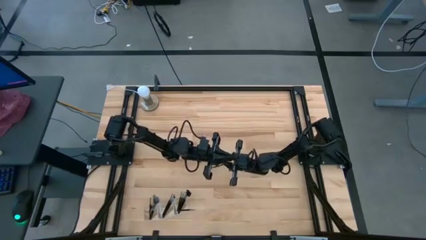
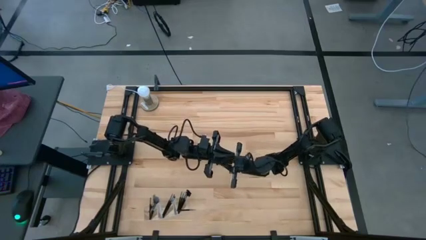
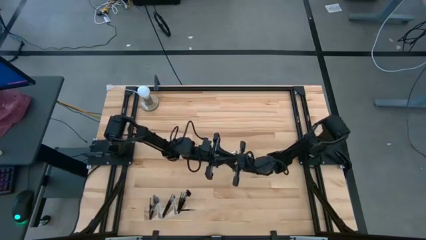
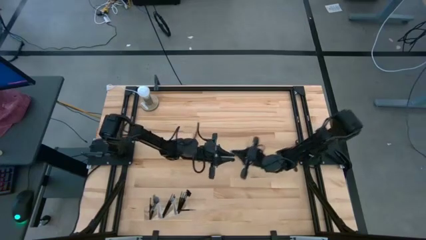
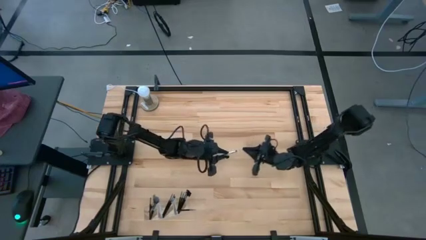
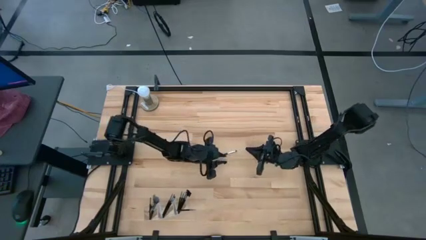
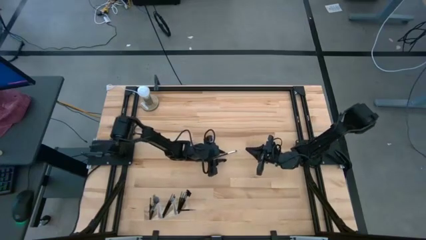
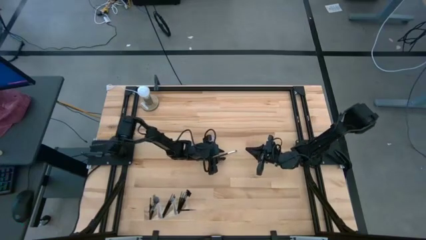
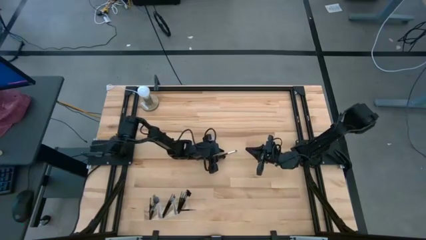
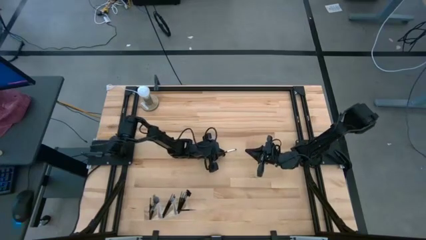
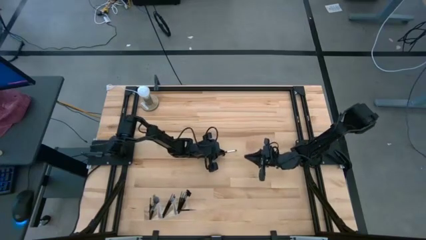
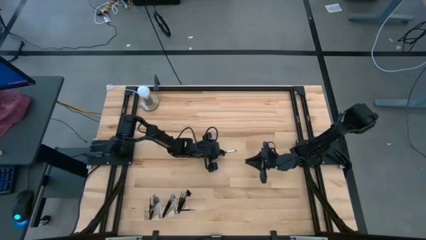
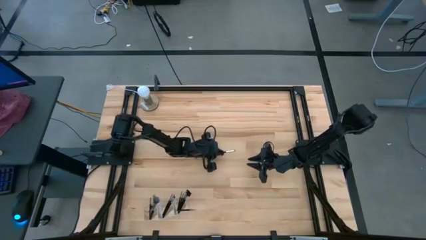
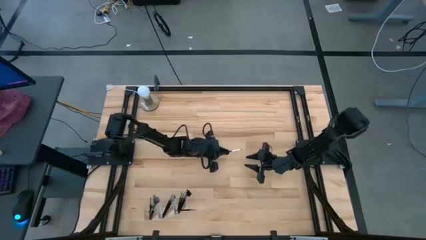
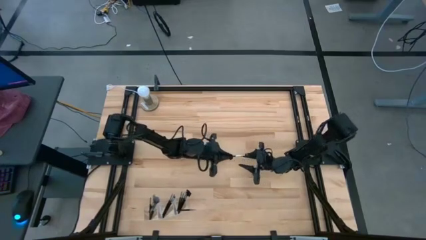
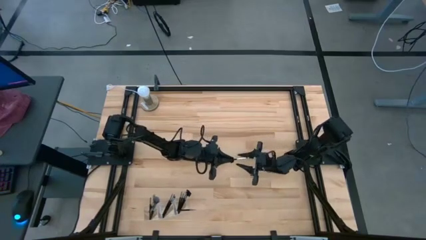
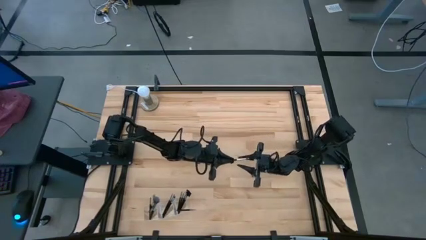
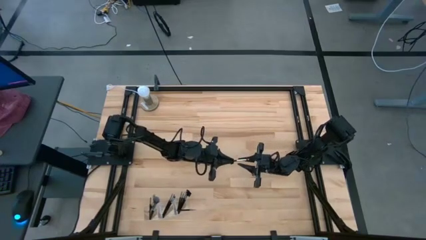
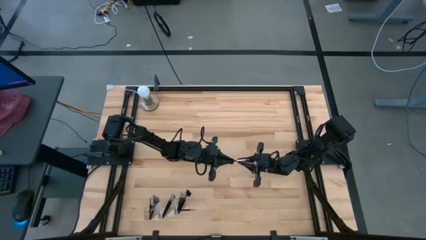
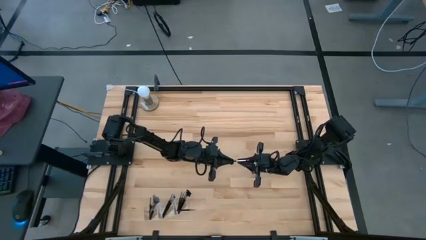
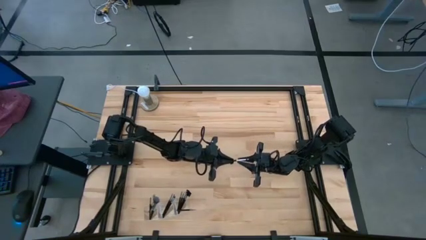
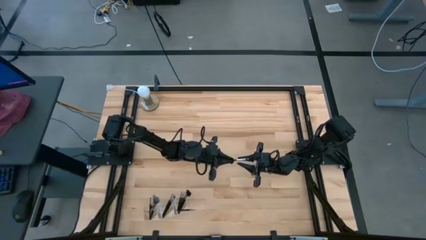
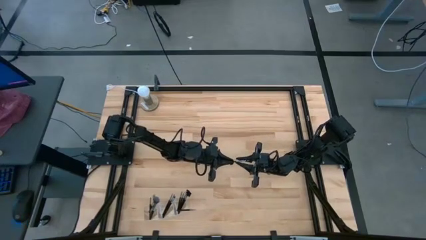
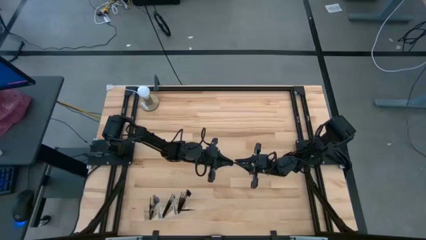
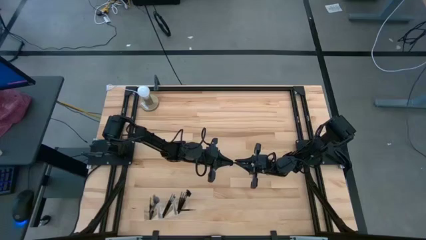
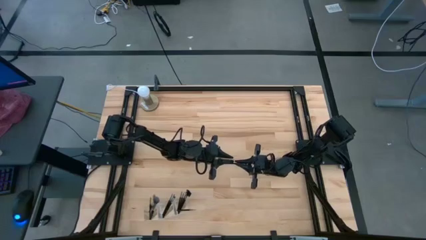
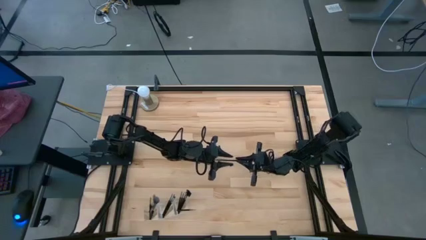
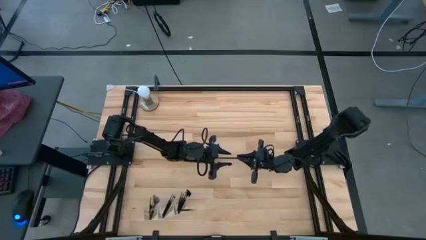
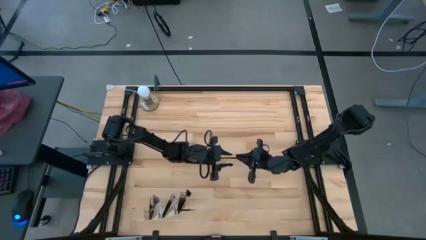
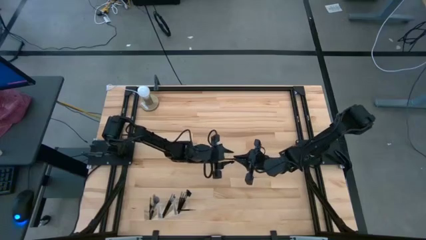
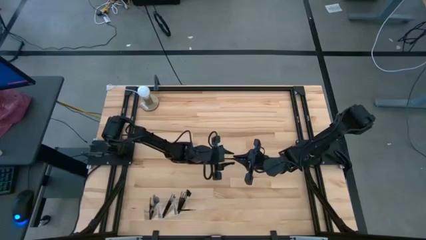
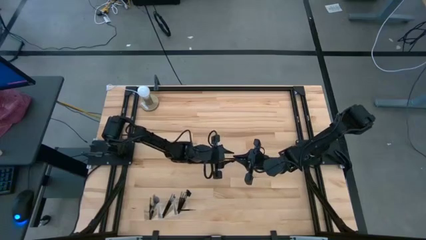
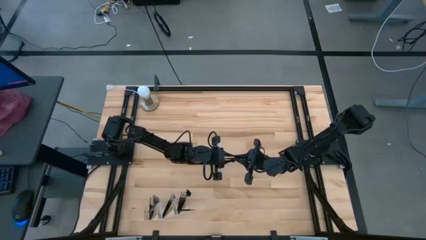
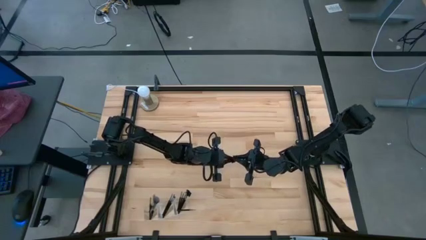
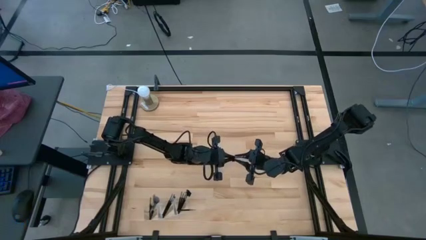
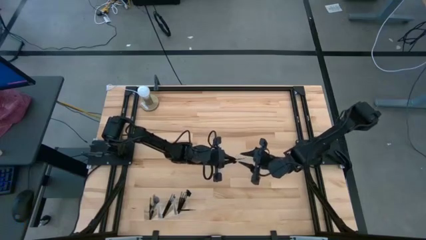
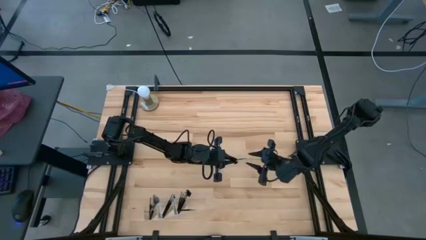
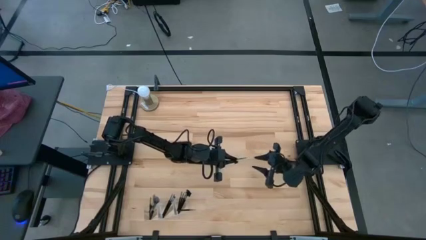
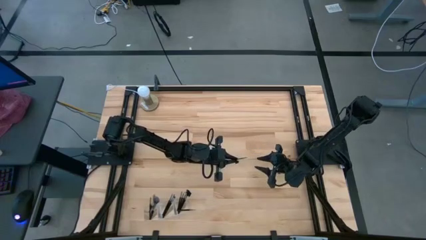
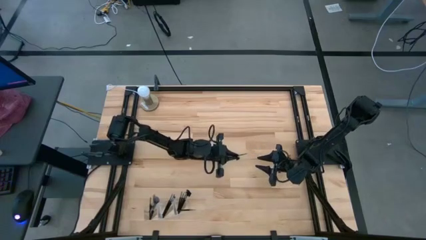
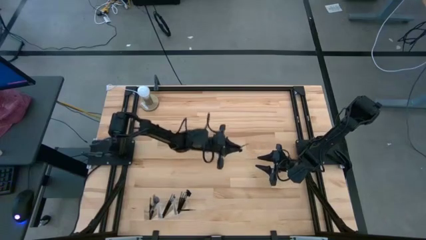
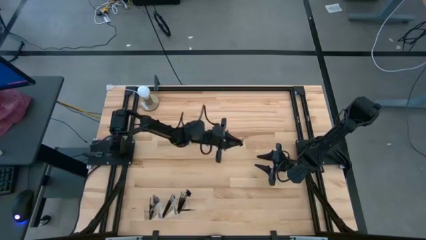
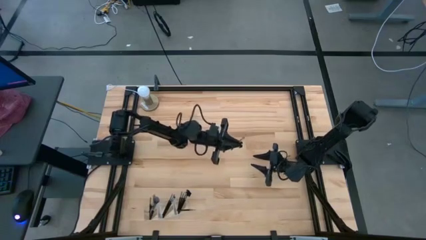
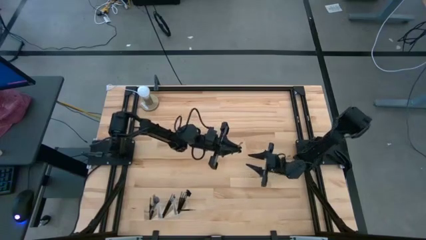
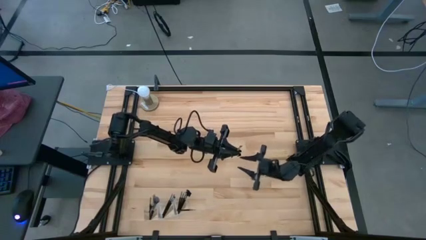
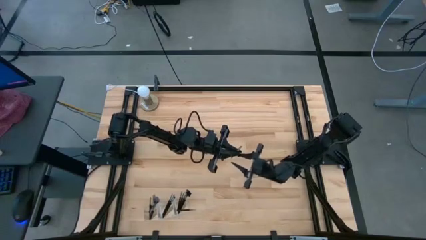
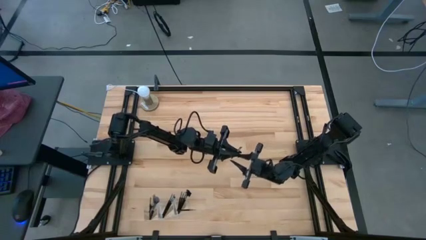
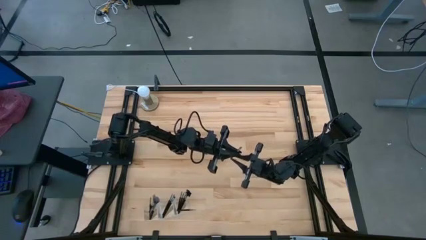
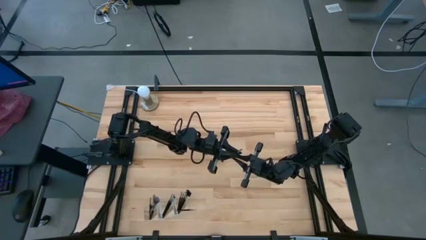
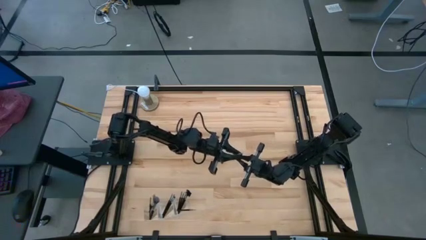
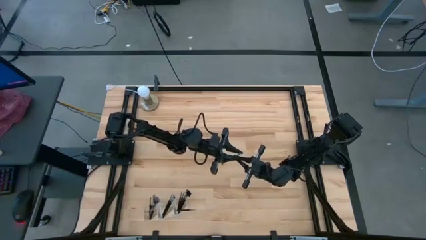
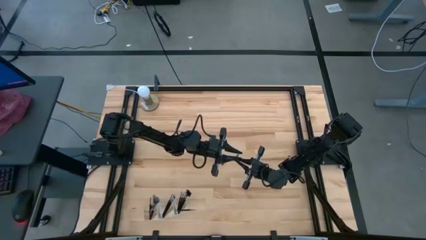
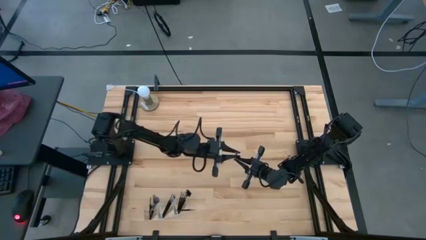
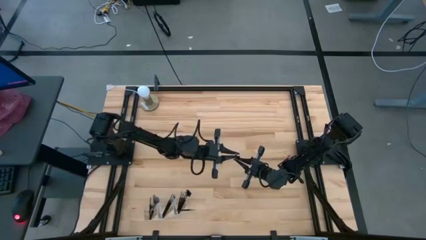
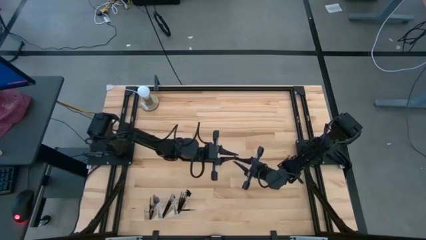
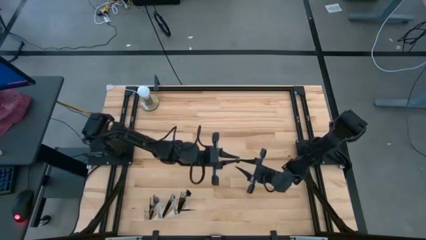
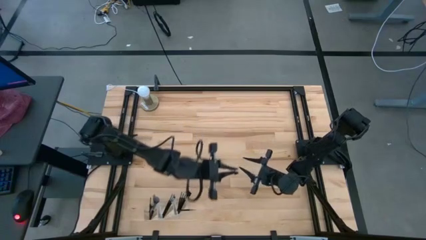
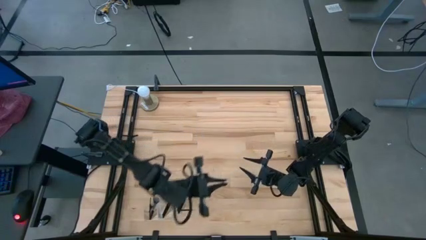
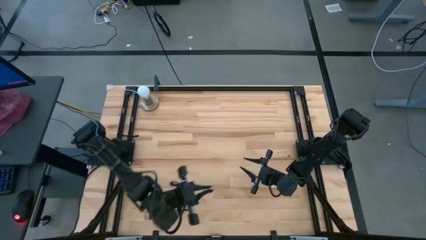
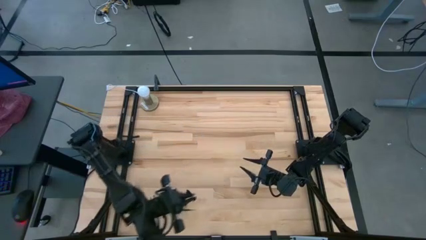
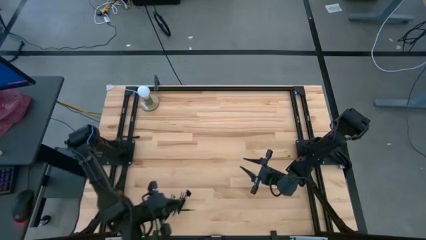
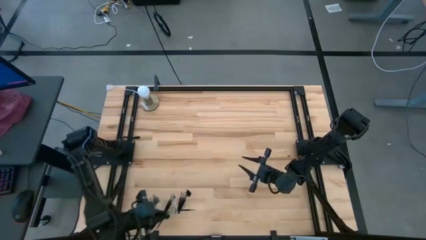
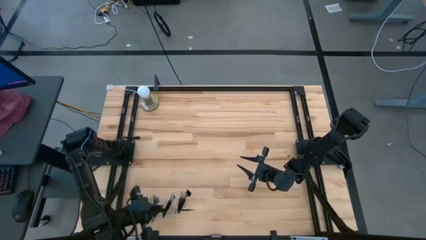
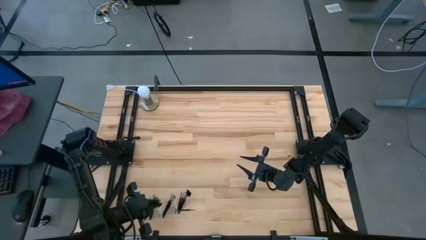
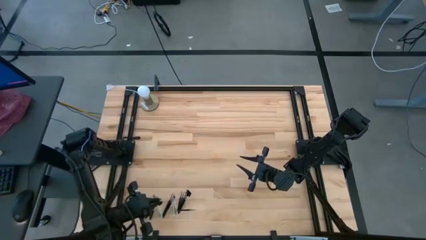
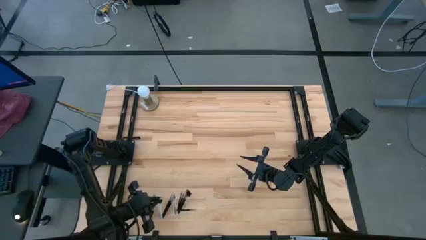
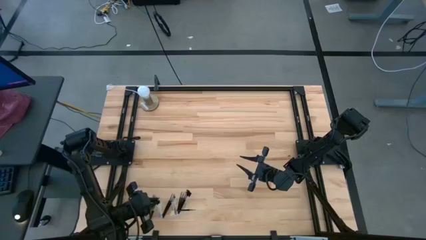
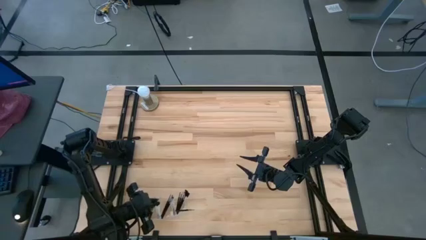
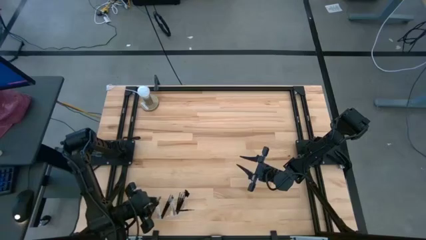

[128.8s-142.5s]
Task: Put items in baskets/containers
Put the black eyeshadow brush into the transparent organizer

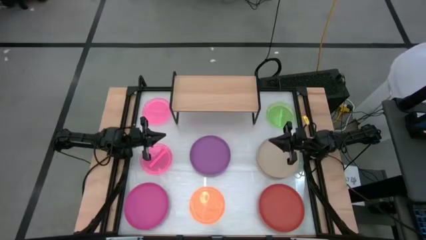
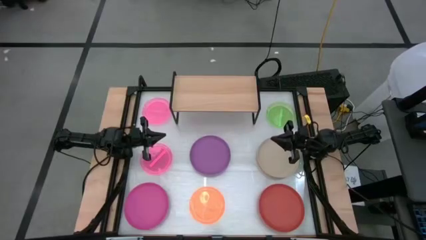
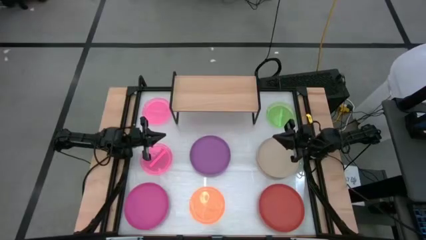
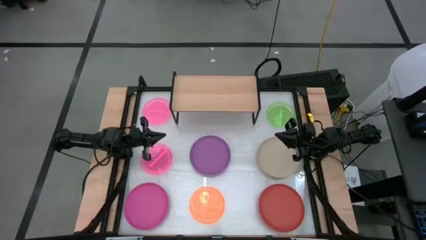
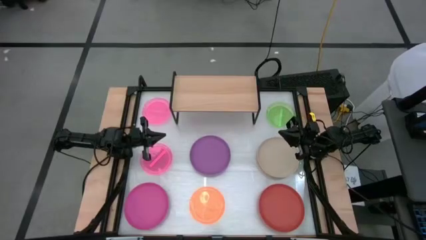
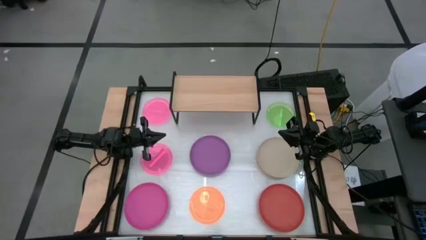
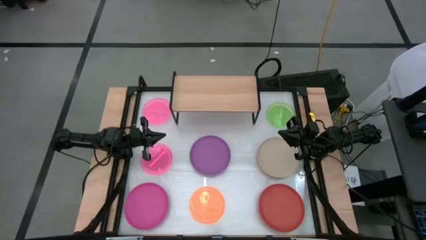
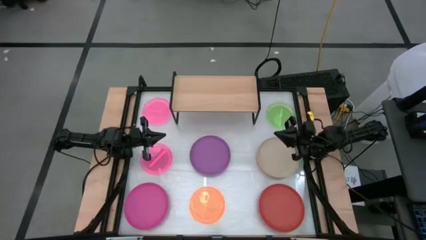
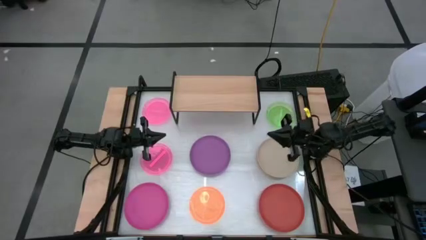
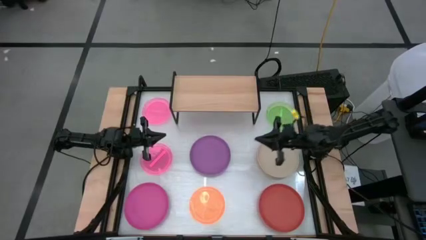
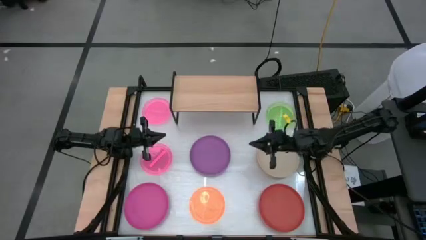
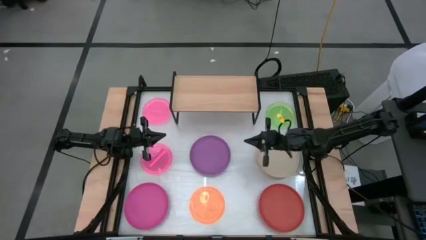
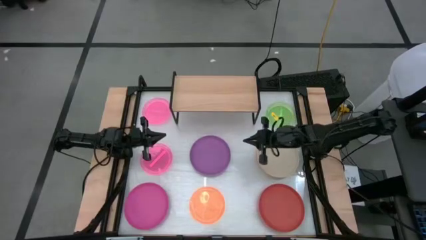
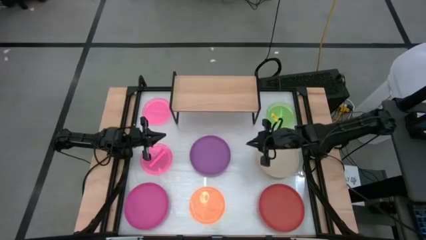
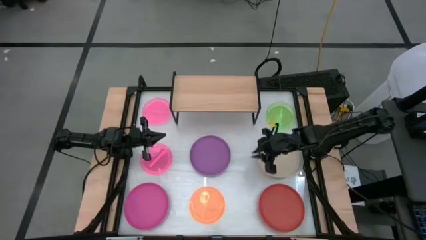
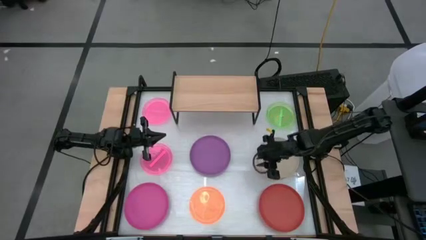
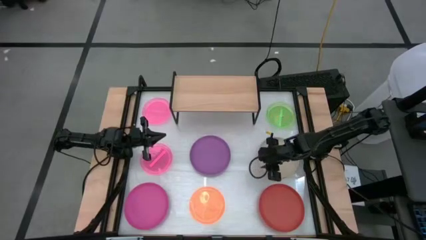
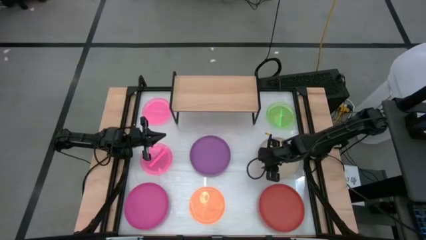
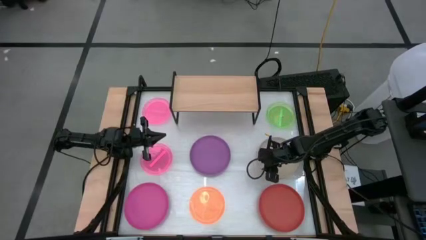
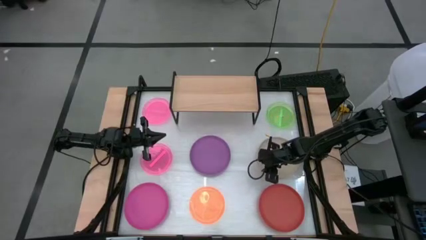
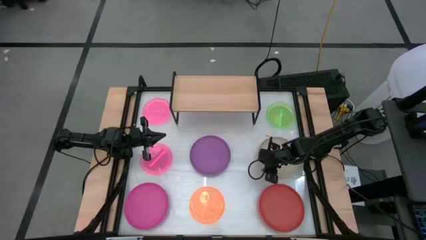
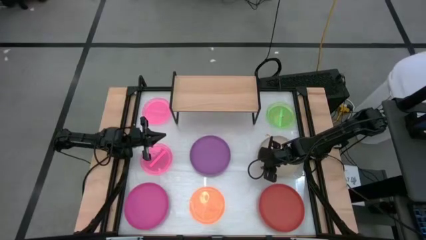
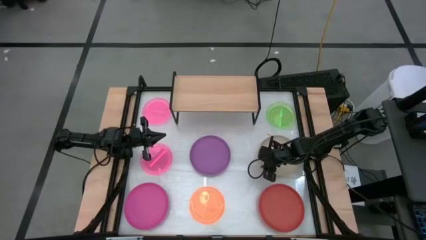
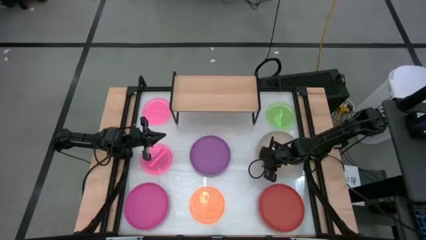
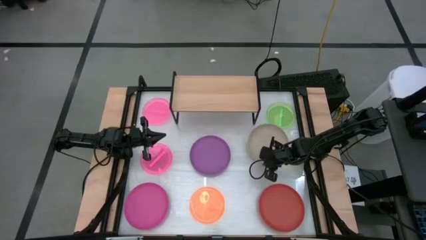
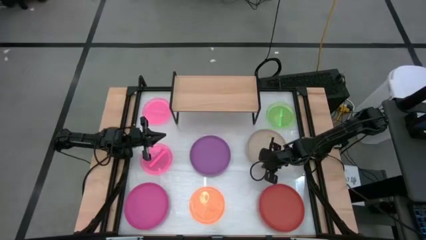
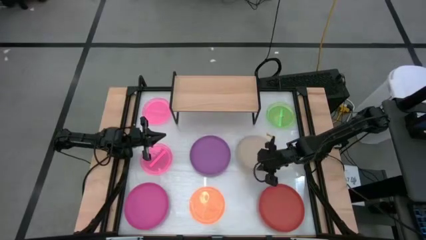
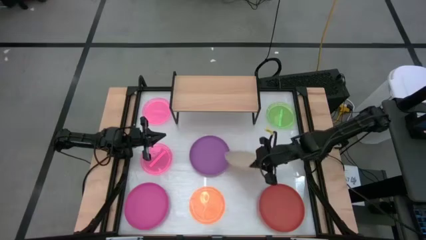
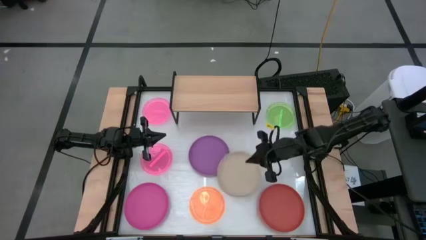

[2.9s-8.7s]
Task: Place and stack plates onto a shelf
Put the brown plate on the shelf
